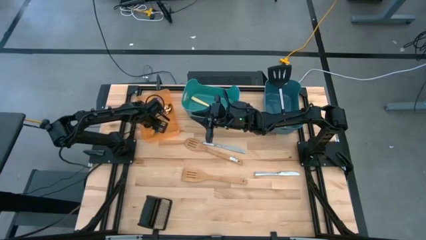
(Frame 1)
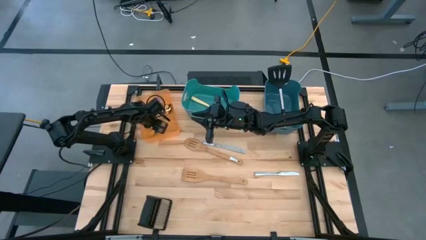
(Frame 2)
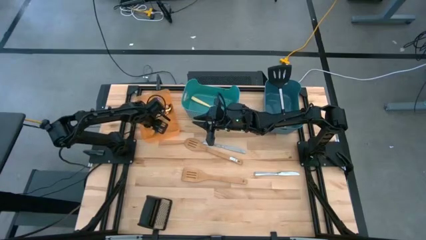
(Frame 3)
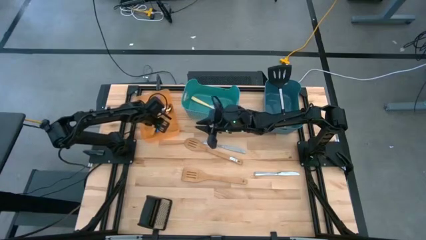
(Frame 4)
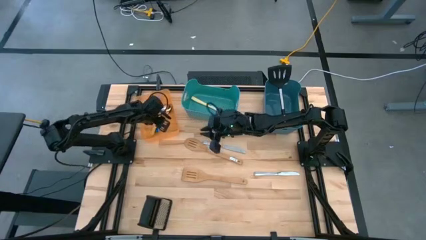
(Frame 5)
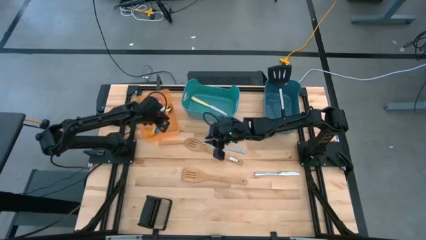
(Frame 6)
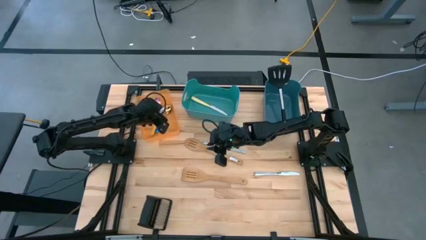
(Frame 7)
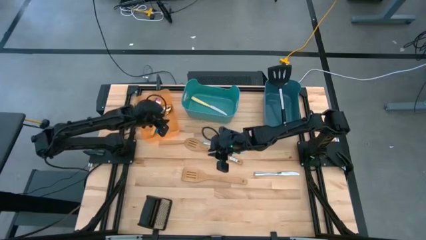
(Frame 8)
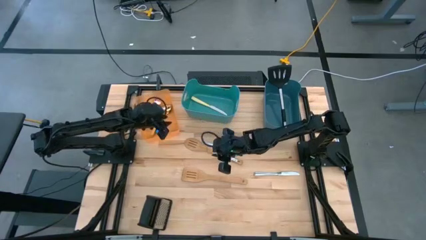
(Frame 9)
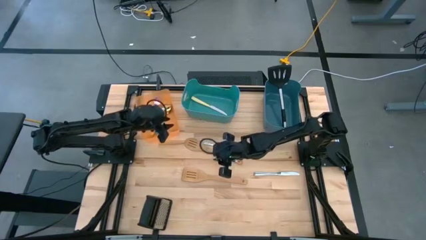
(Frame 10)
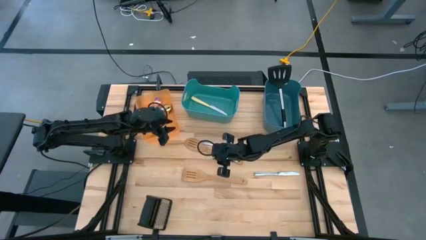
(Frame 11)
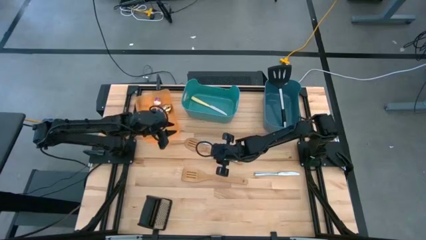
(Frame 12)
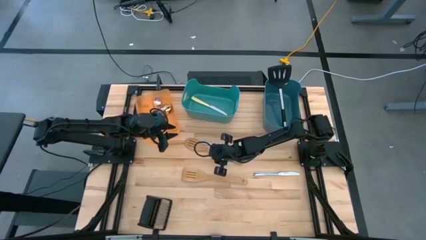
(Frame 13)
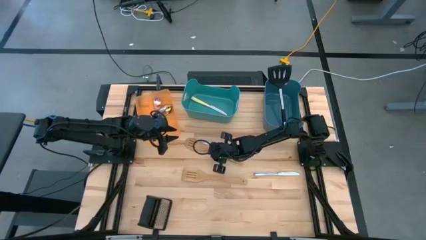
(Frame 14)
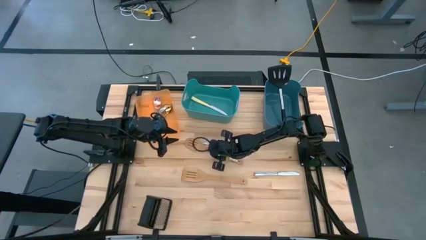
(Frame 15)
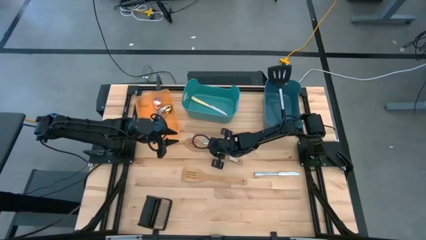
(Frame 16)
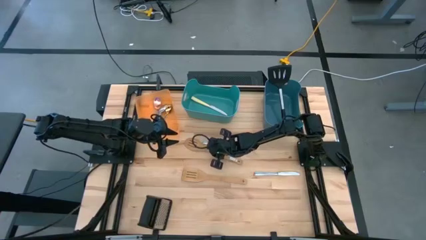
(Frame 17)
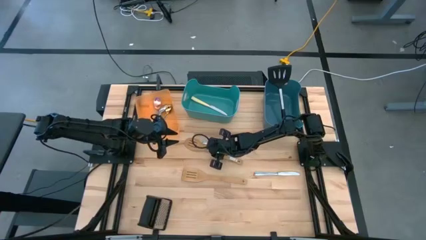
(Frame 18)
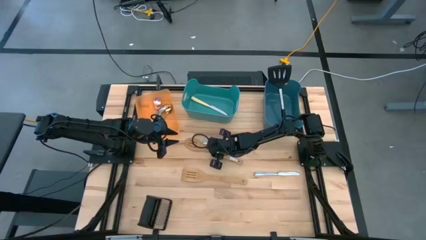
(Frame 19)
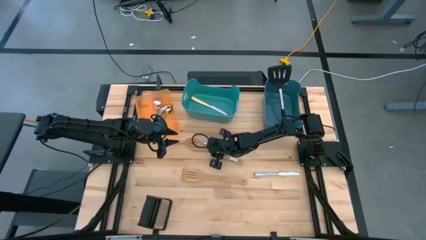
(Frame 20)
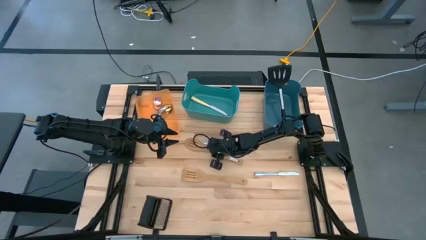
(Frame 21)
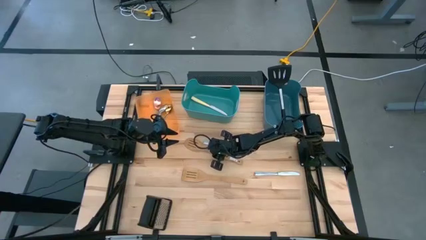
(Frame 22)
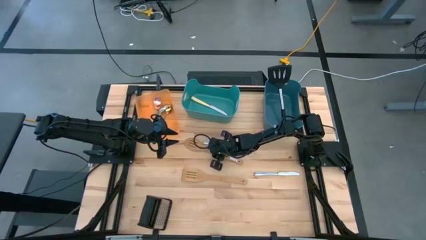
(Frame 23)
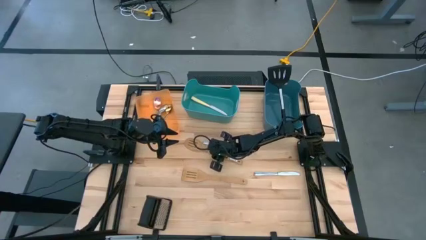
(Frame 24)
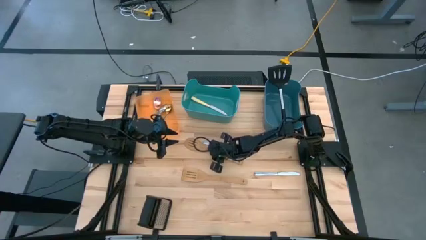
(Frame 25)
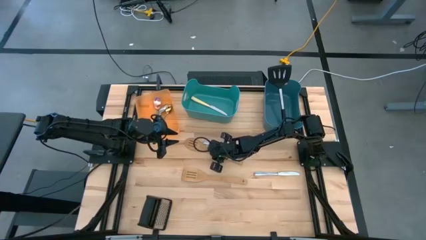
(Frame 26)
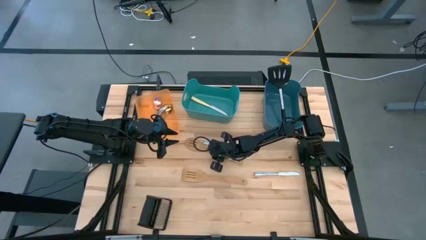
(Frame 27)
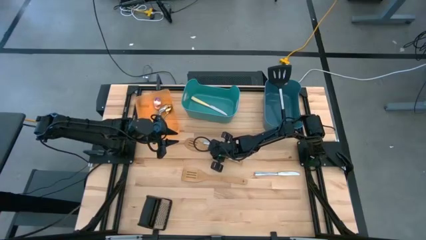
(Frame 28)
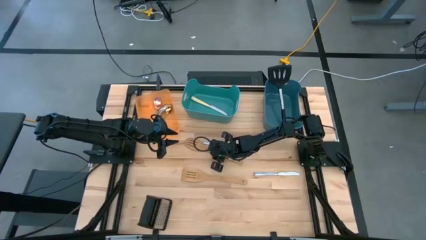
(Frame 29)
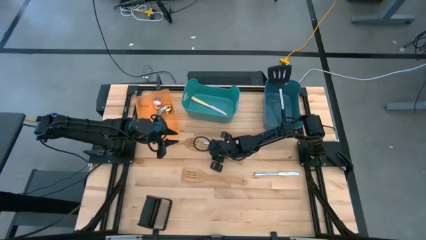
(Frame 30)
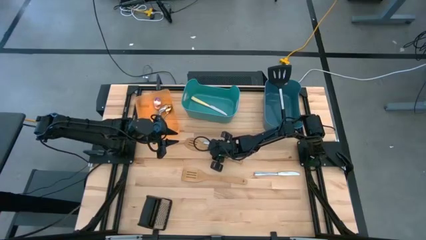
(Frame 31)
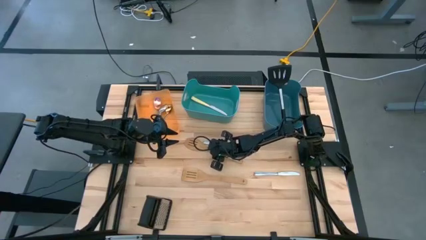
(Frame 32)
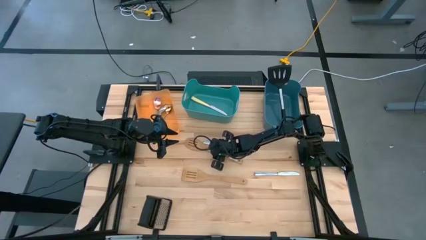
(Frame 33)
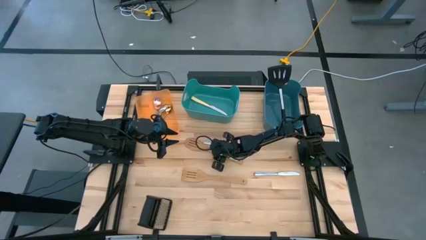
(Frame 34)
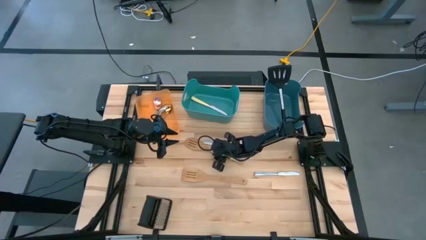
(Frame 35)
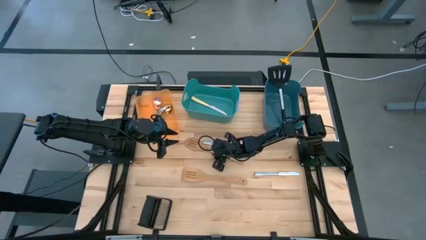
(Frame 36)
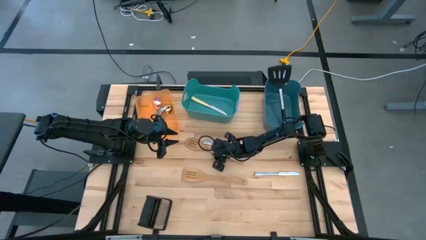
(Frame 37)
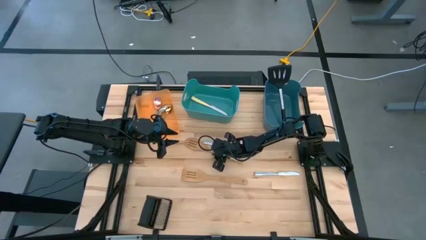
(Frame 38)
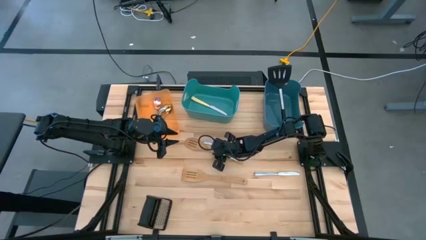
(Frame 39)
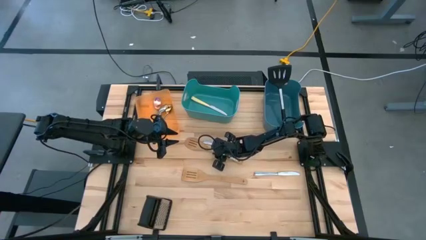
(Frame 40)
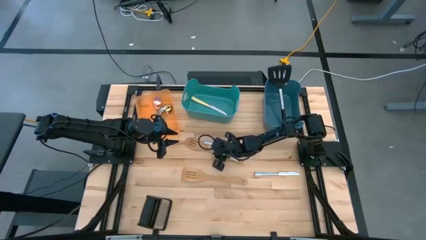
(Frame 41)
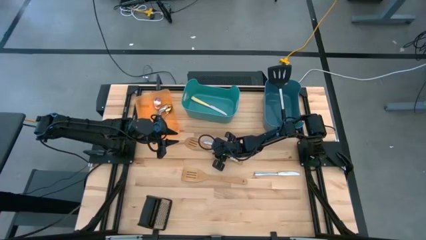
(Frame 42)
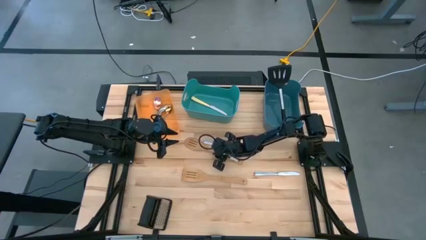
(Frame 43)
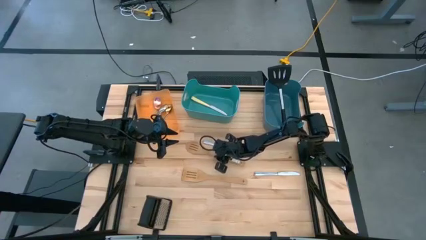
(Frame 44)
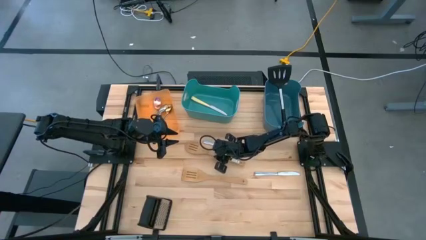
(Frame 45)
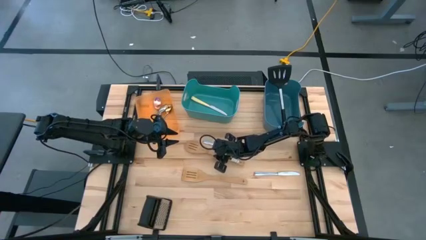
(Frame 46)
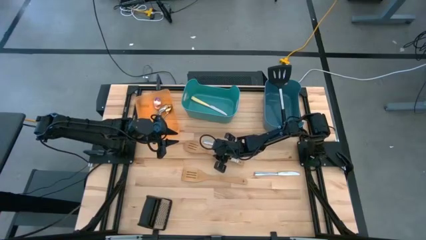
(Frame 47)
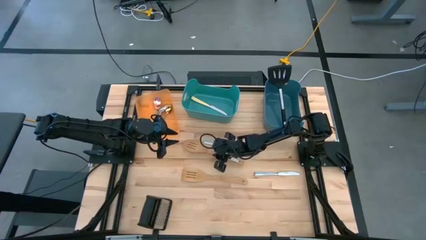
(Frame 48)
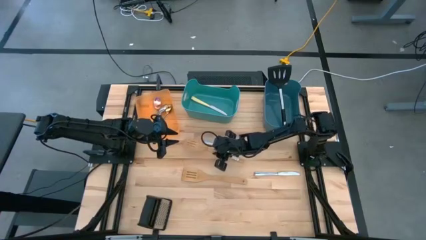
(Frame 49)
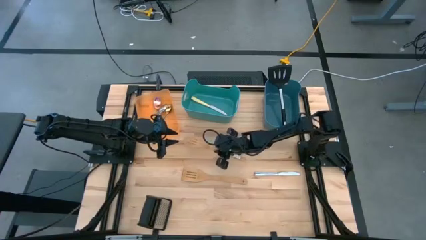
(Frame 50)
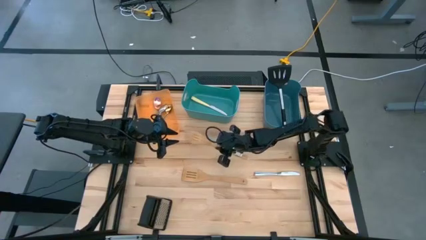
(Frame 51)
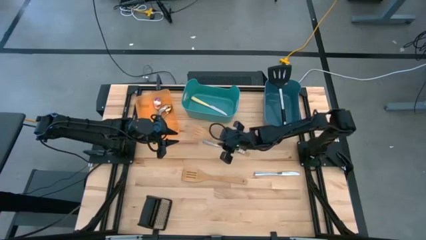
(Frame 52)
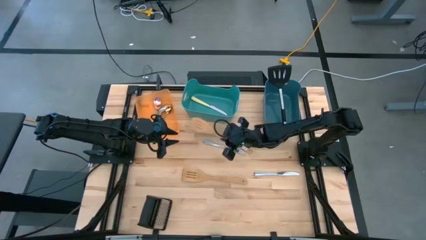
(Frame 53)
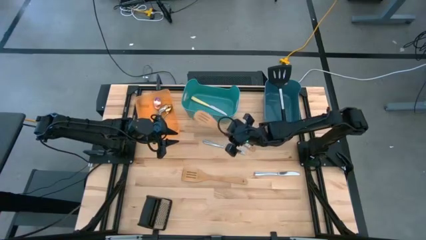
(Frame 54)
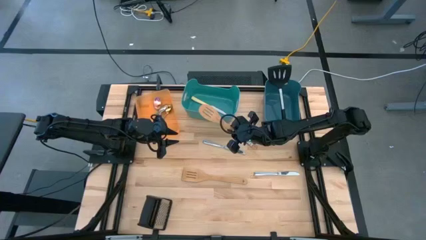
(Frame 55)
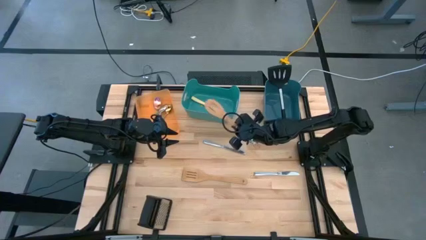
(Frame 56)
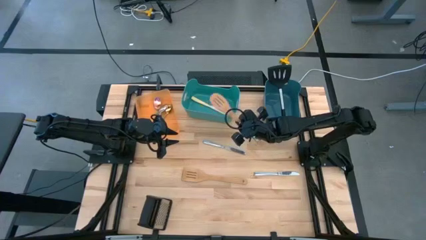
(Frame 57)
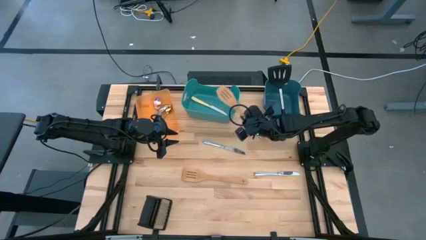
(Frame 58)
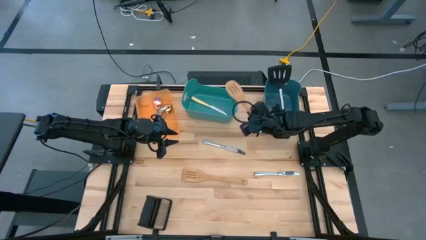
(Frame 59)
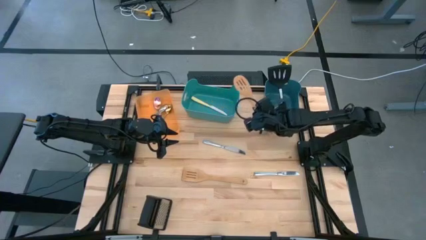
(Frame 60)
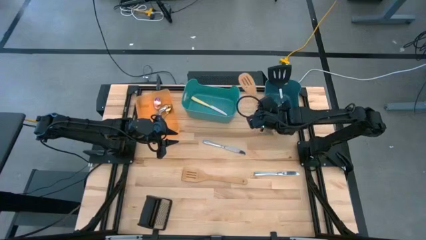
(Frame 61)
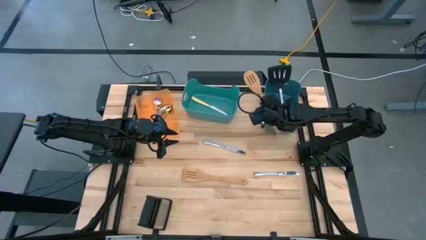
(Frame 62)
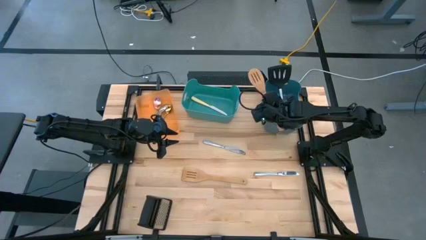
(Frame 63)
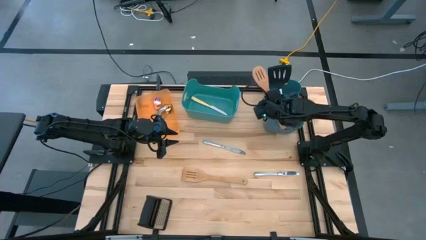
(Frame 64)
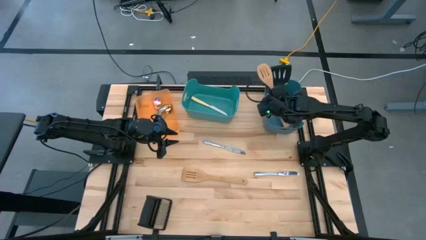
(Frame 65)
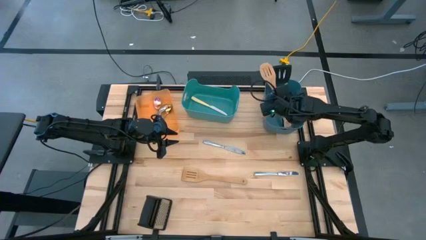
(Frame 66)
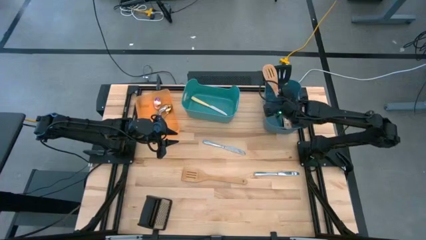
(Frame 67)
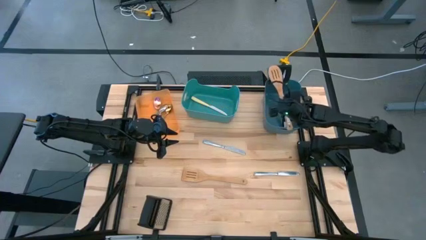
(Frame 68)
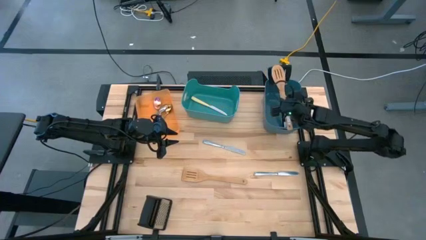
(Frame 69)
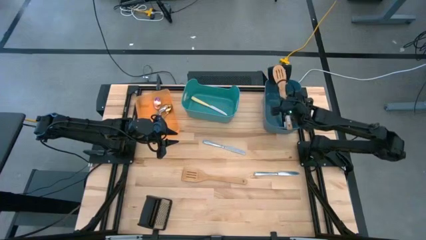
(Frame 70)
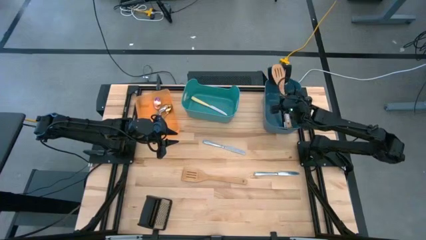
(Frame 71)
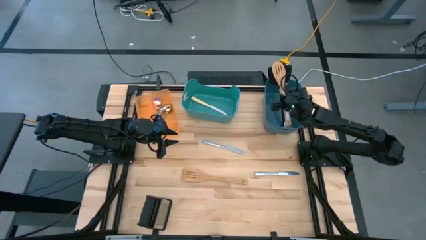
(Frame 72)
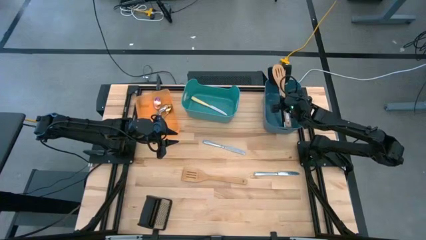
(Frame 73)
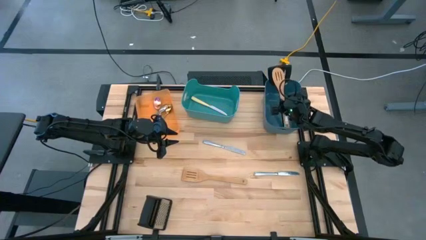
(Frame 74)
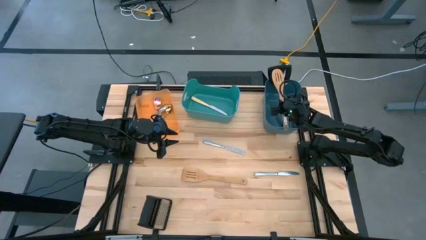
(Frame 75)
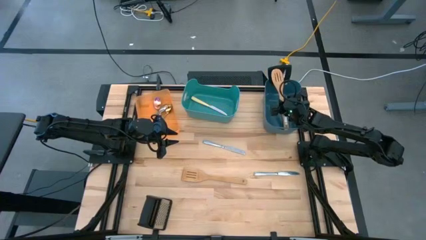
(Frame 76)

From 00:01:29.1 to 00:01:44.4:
Task: Pick & Place Kitchen Items
Put the brown spatula into the blue bin
